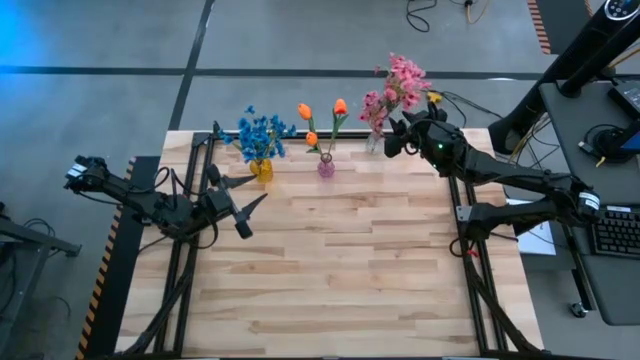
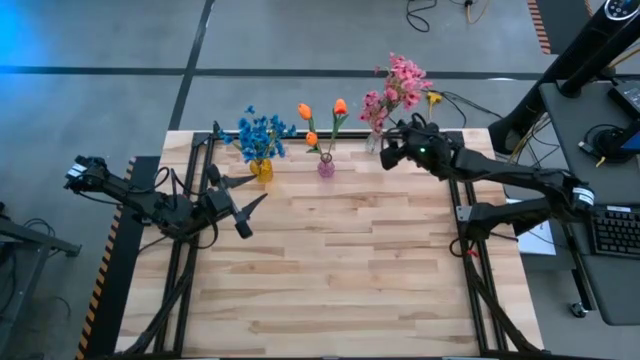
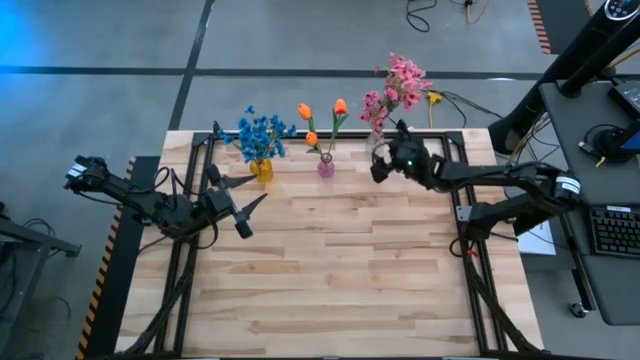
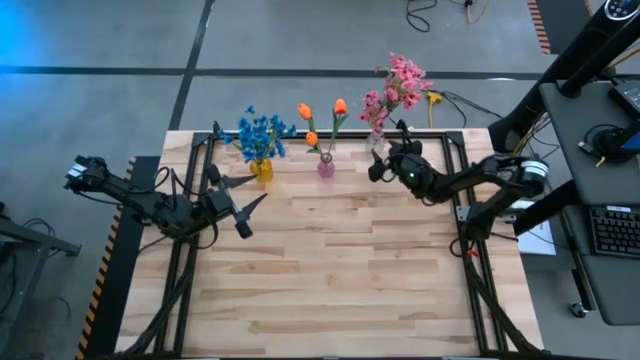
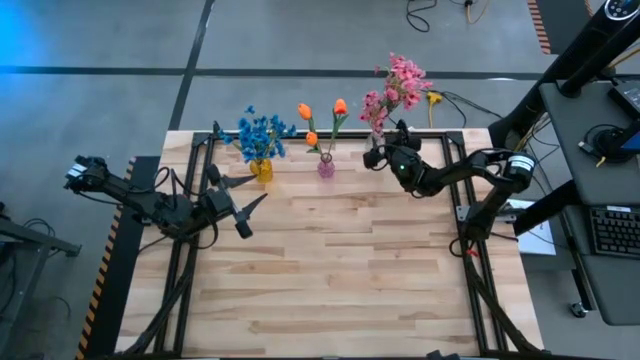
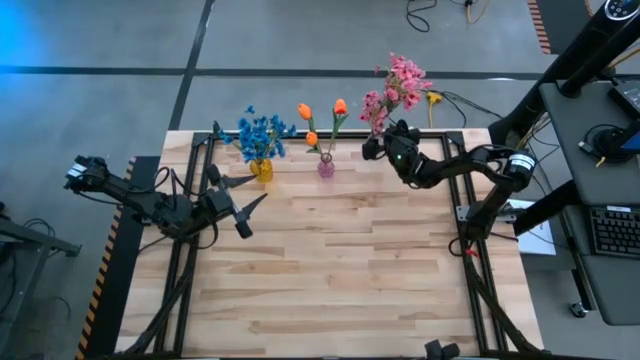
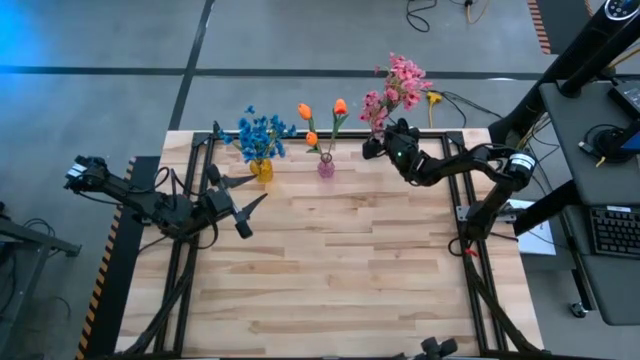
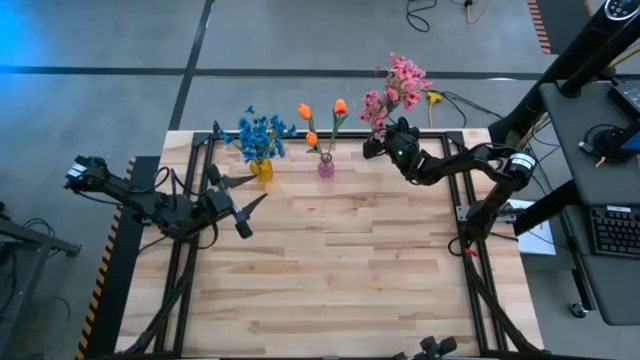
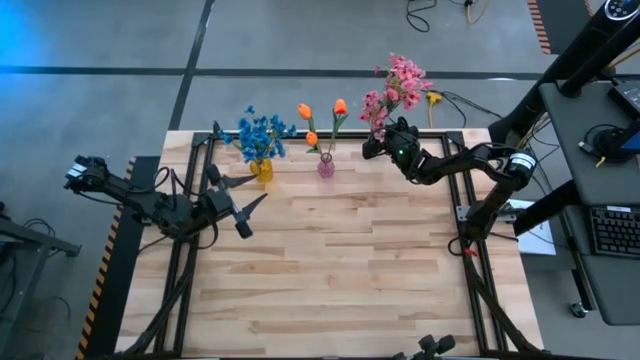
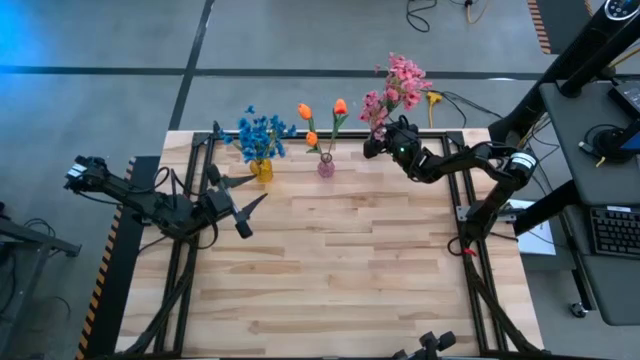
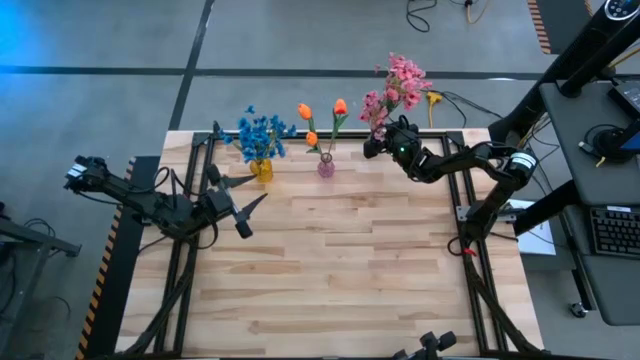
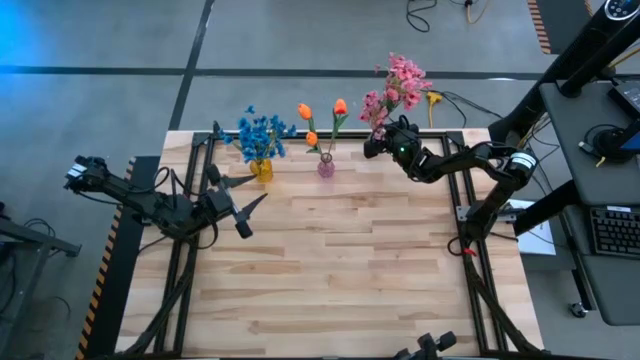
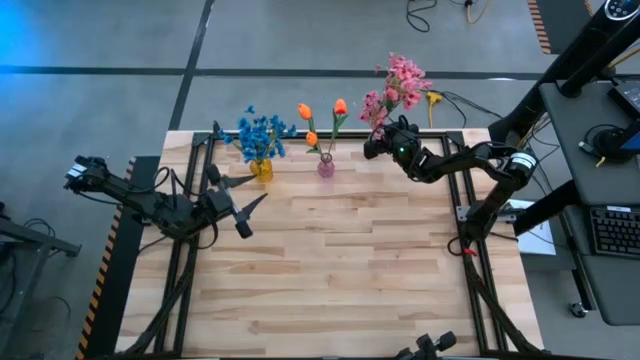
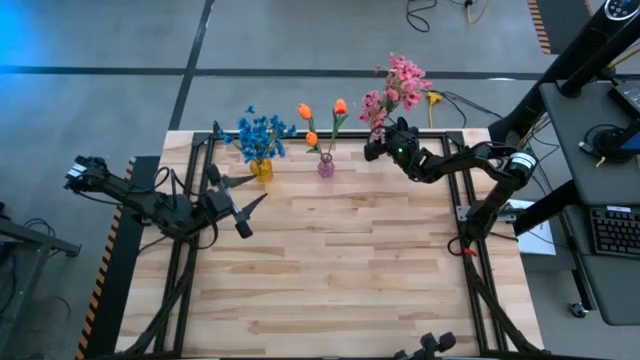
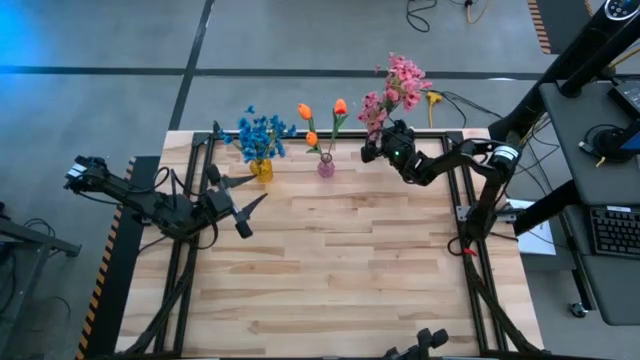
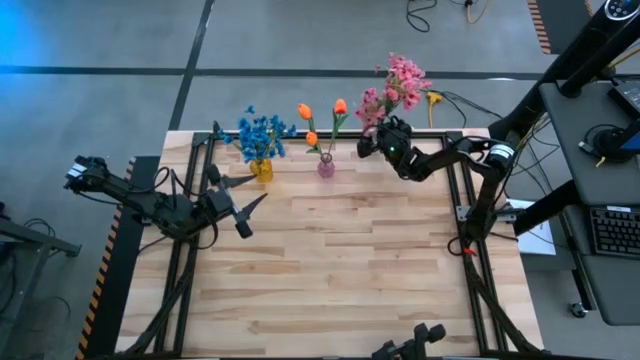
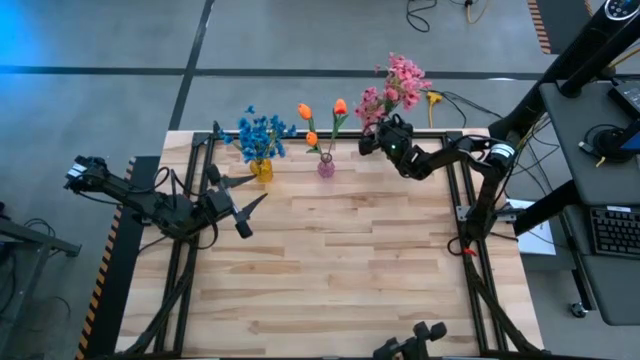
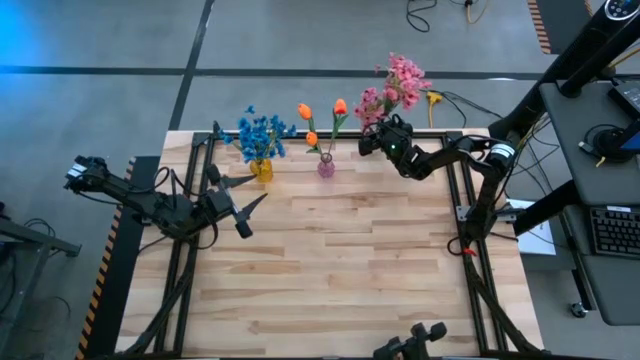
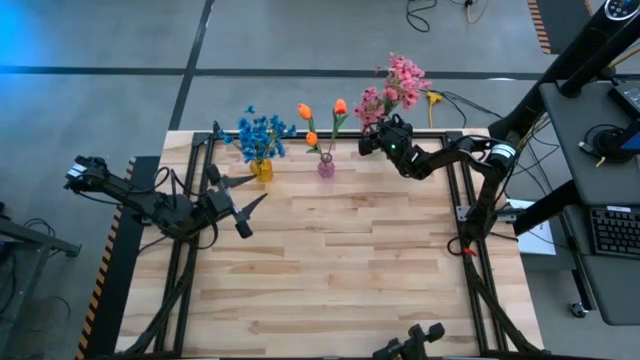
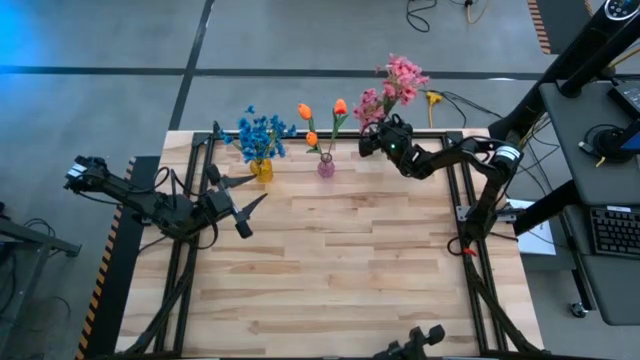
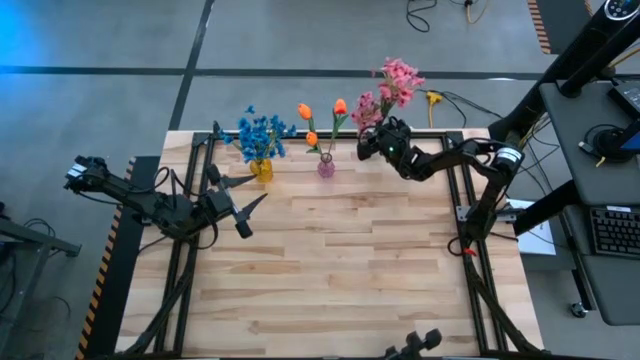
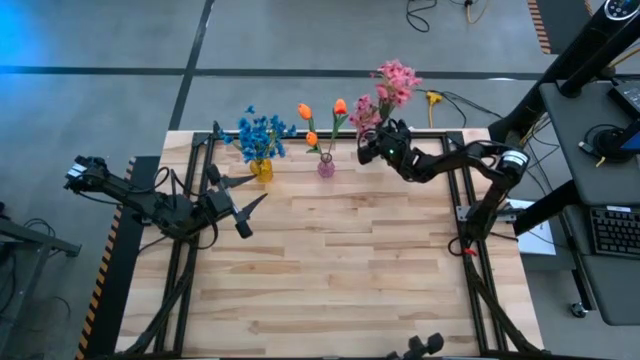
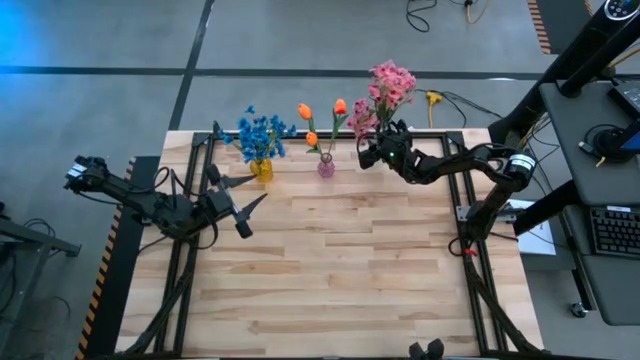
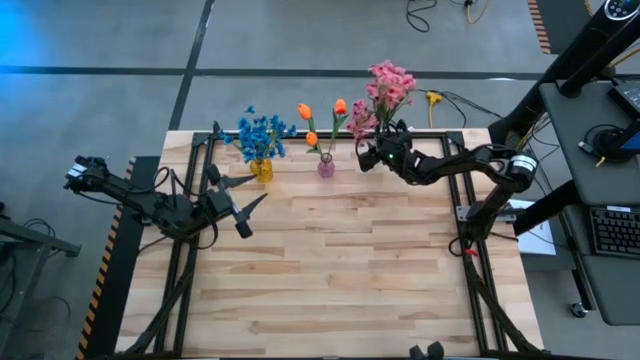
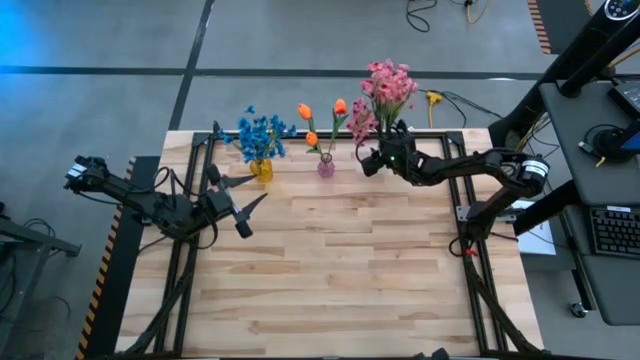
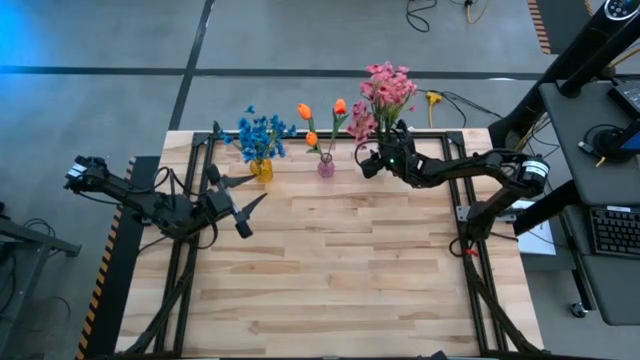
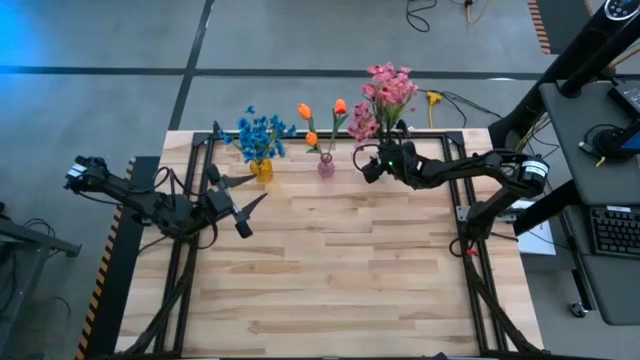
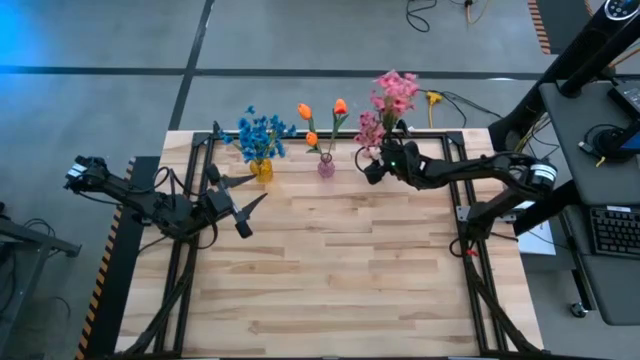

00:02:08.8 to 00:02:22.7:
Task: Sort flowers into vase by color
Adjust the transparent vase
